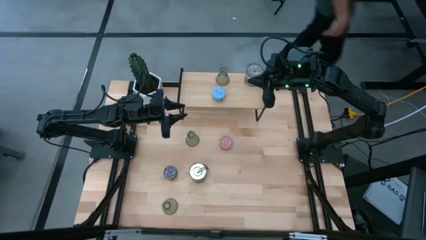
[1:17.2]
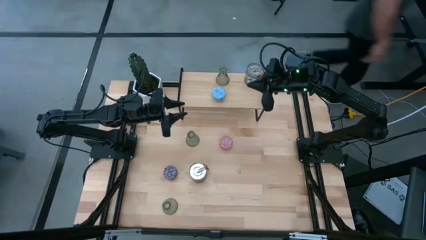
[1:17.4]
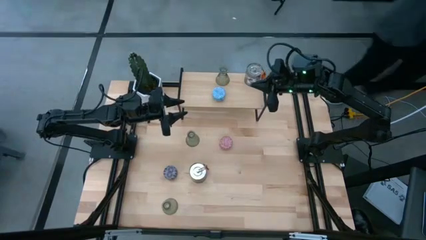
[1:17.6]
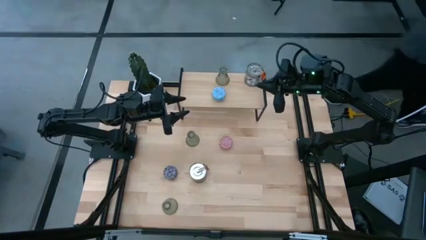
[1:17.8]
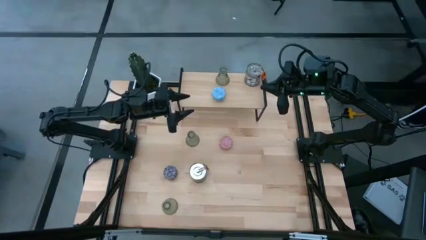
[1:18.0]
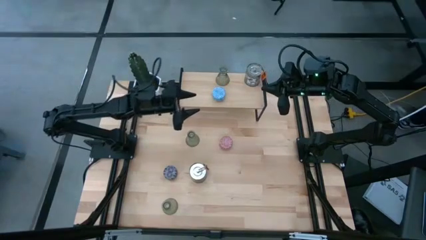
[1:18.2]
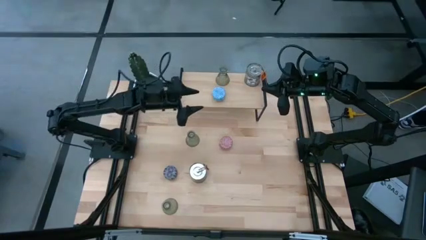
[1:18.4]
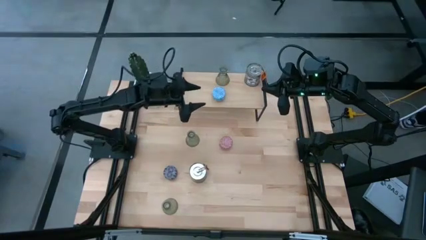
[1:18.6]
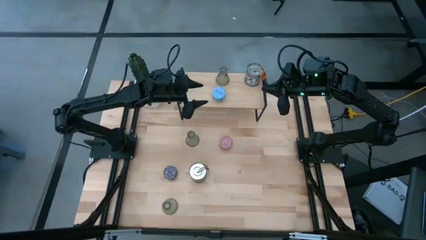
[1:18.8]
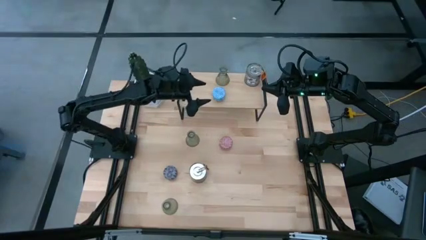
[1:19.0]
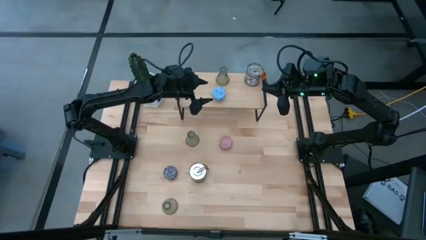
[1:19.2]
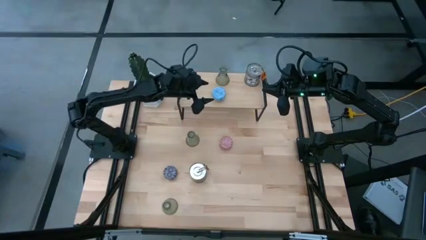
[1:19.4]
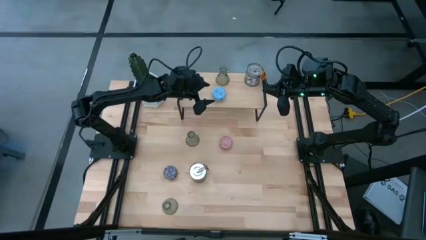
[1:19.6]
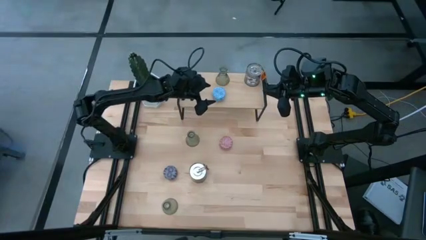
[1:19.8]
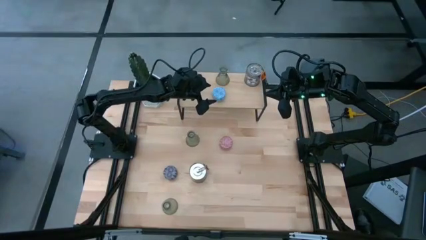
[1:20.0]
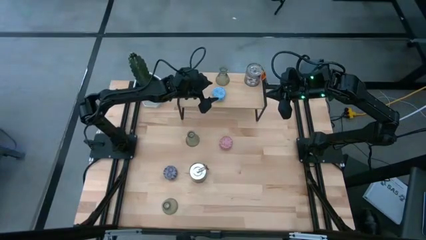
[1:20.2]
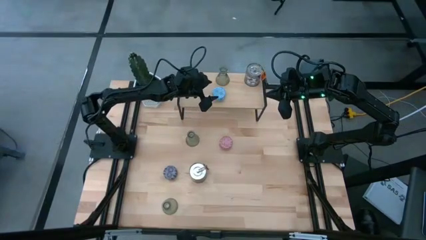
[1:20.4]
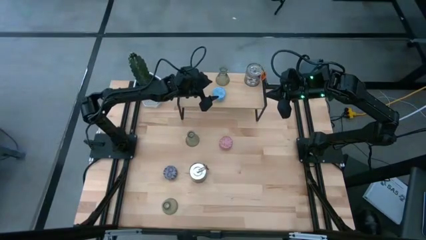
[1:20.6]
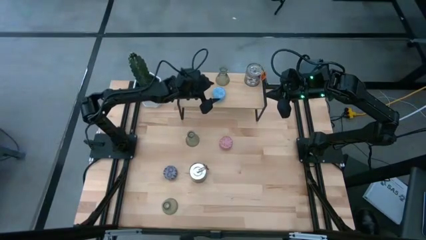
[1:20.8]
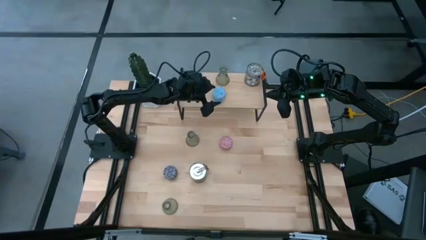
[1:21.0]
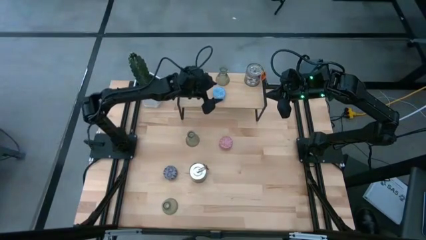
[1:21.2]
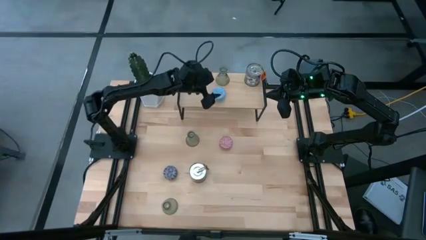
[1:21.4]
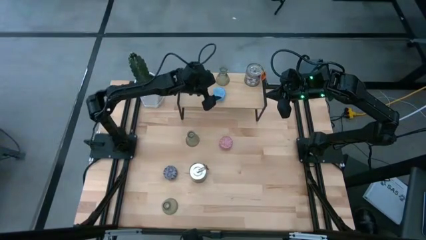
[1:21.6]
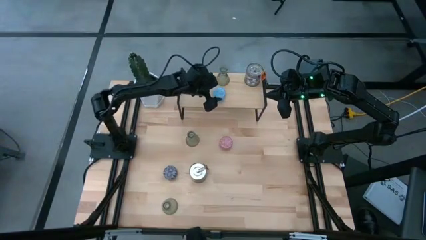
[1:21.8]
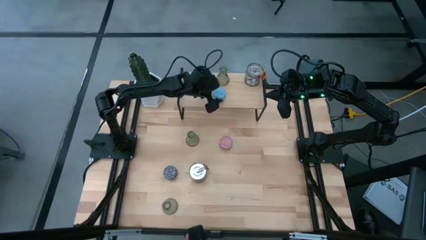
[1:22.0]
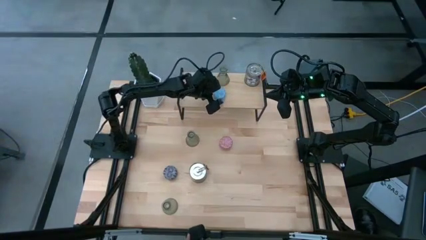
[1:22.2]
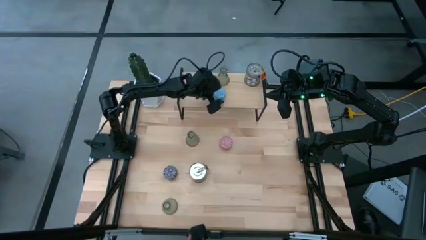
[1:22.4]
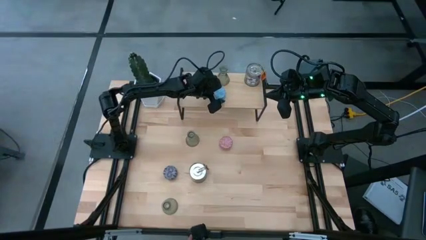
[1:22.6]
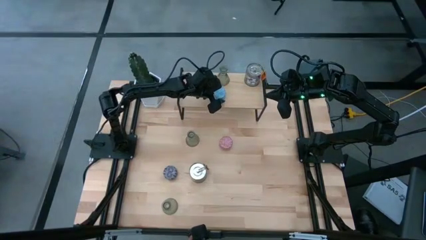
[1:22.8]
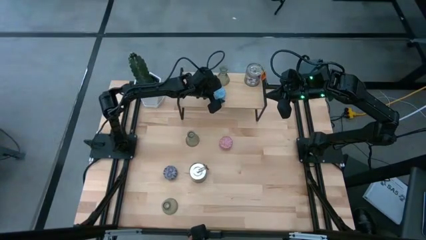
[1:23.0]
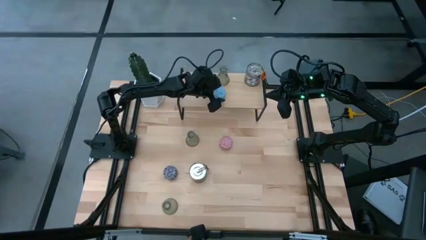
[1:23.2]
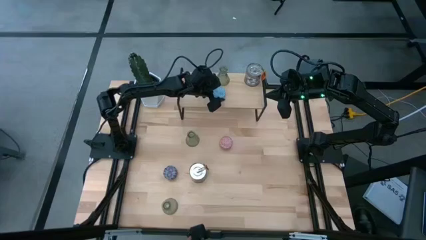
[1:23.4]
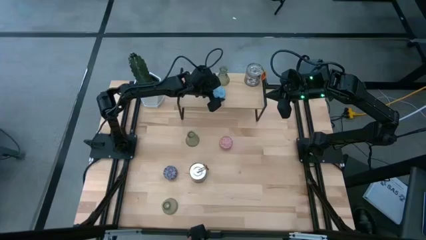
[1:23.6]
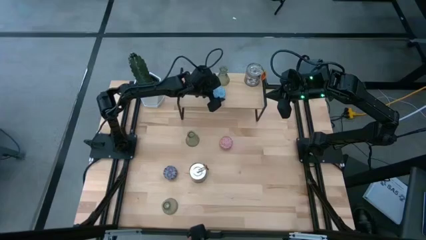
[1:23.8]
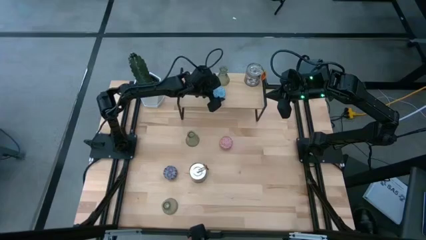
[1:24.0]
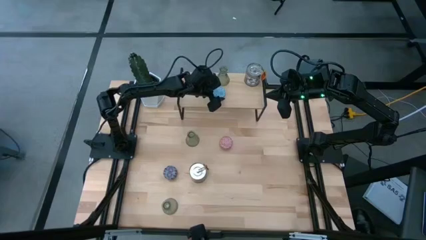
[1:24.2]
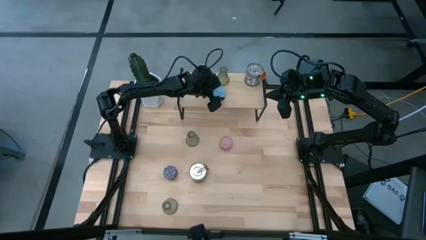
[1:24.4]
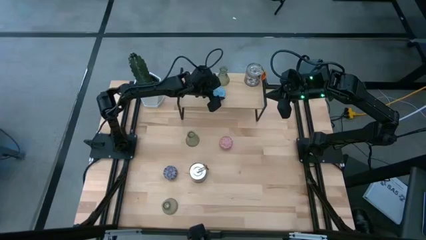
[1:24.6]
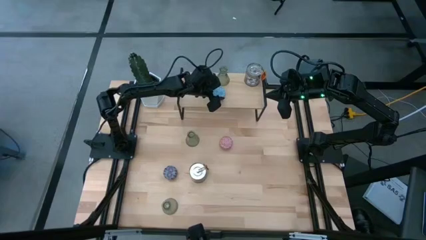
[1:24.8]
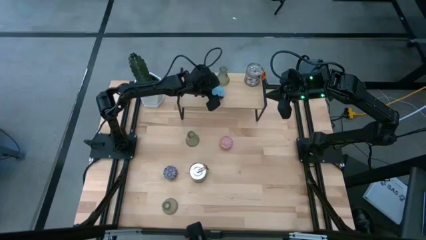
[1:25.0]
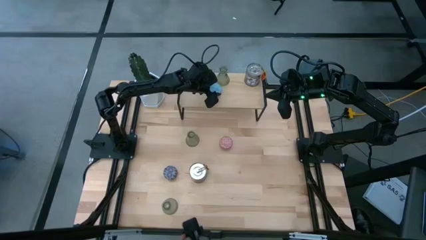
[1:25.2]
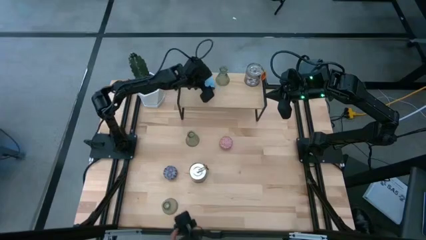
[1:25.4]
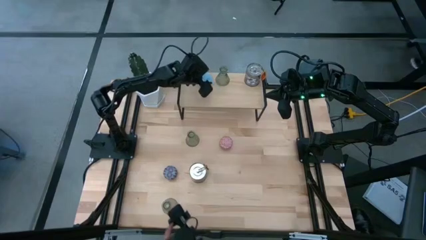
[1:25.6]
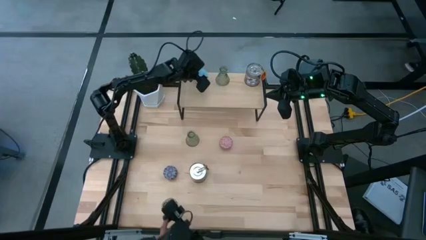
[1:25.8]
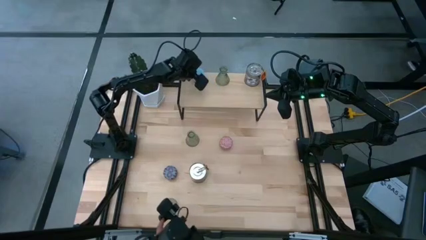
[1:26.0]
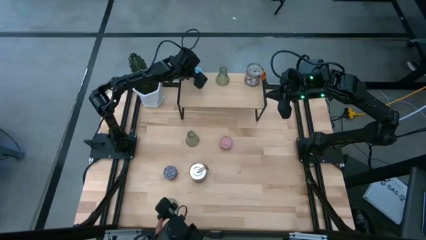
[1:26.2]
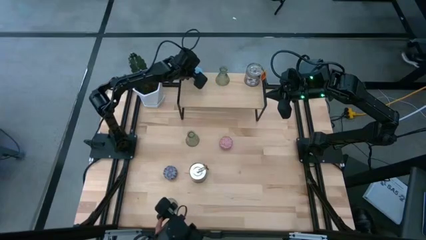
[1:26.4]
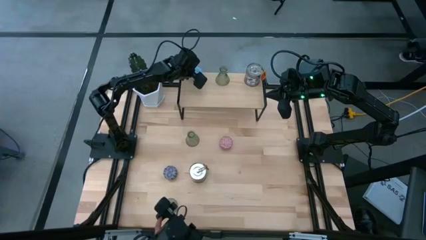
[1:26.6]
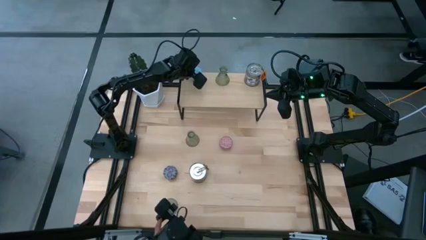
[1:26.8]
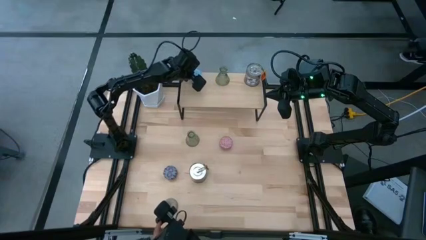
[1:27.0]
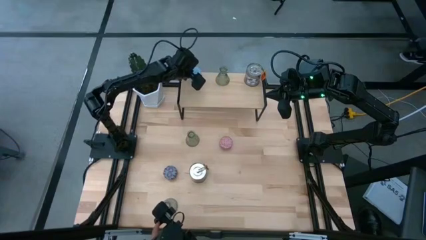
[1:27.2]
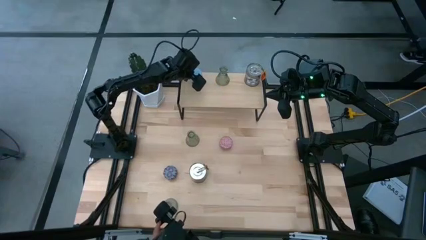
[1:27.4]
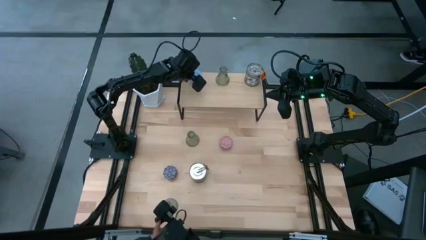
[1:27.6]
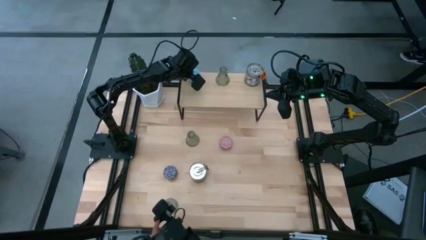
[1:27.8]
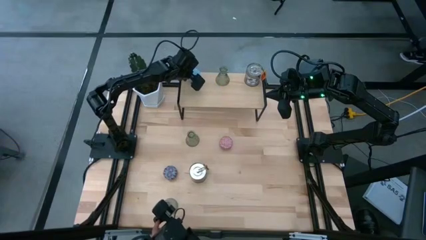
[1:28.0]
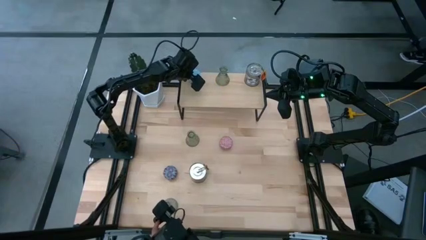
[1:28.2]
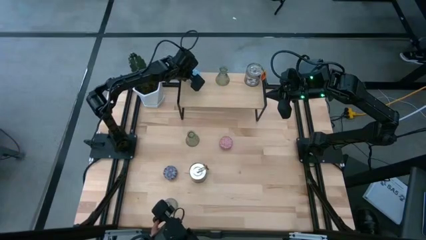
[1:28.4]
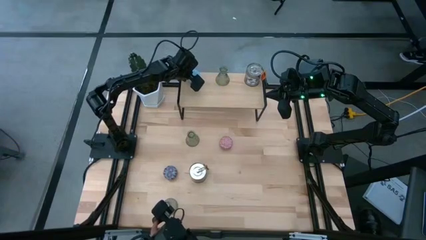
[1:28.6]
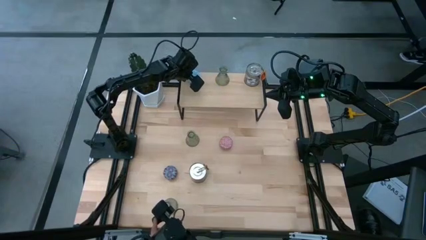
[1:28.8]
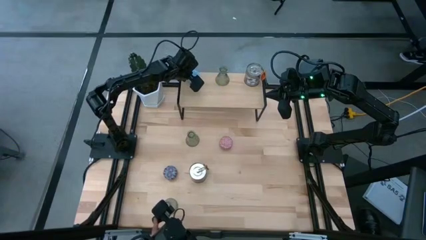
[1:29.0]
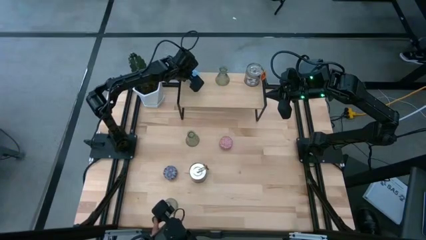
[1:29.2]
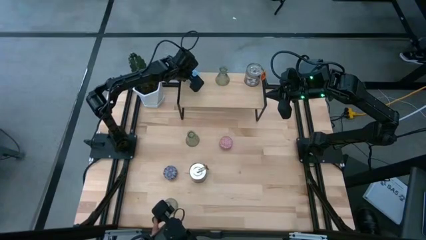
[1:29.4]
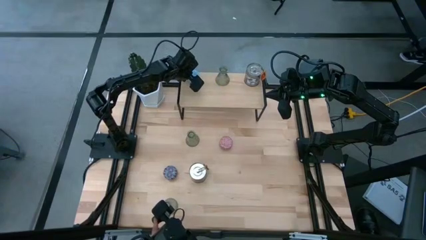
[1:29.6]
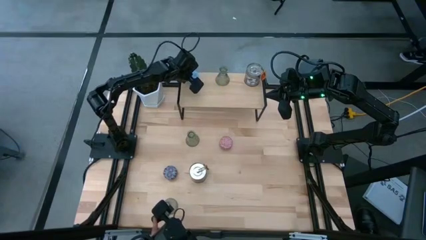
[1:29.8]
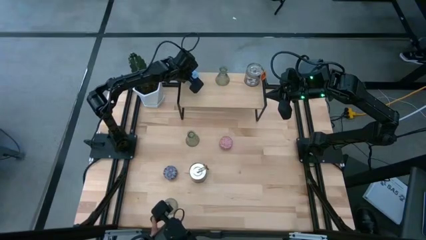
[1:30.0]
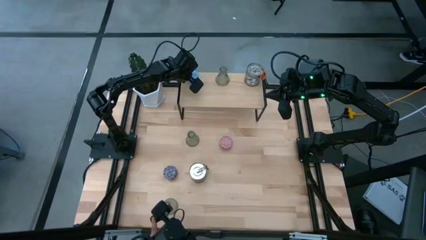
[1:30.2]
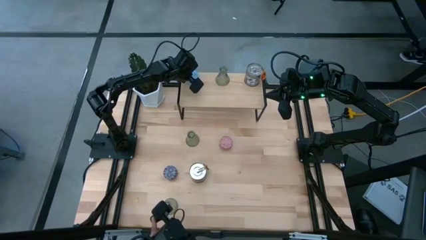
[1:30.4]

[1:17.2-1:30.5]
Task: Pick & Place candle stick holders
Put the blue scented candle on the shelf
